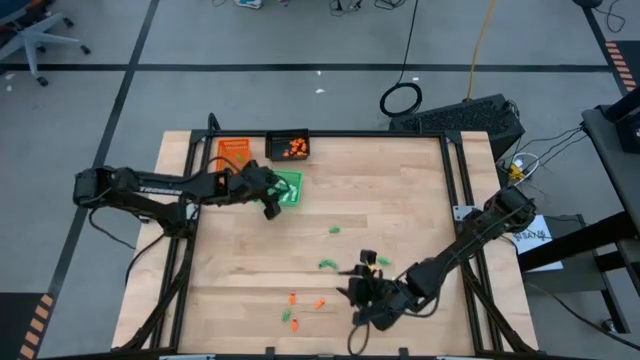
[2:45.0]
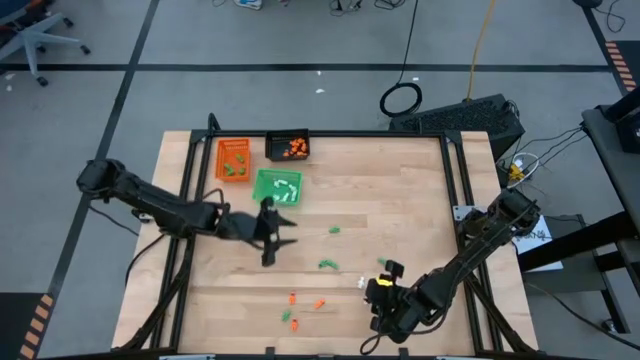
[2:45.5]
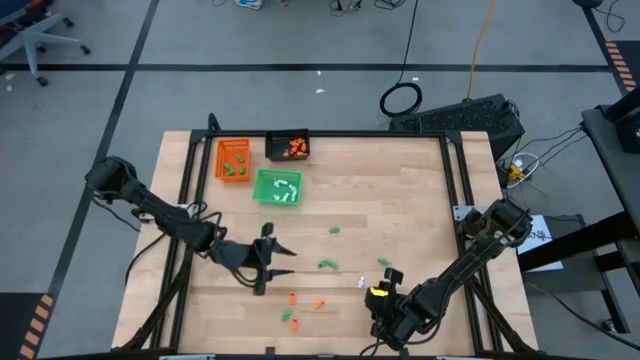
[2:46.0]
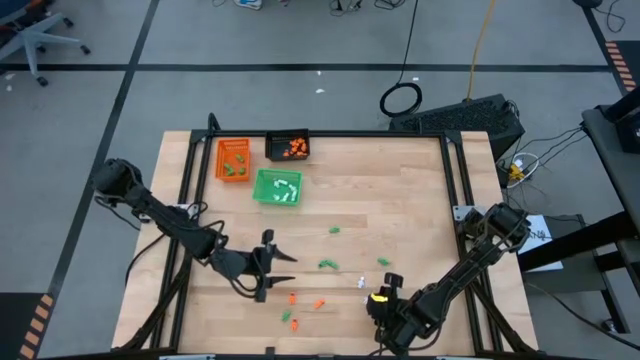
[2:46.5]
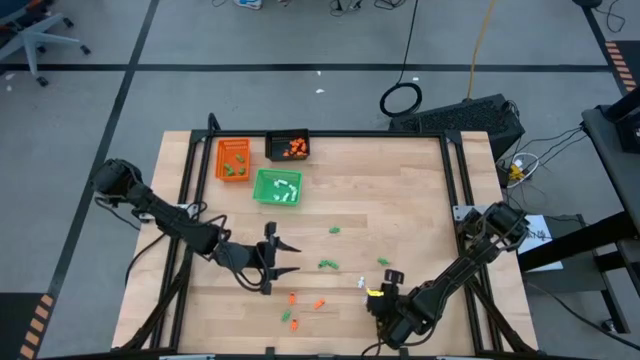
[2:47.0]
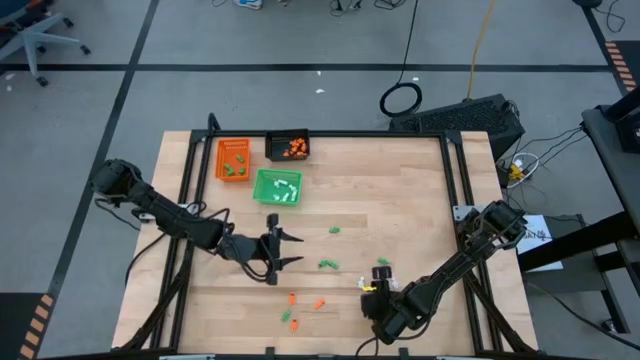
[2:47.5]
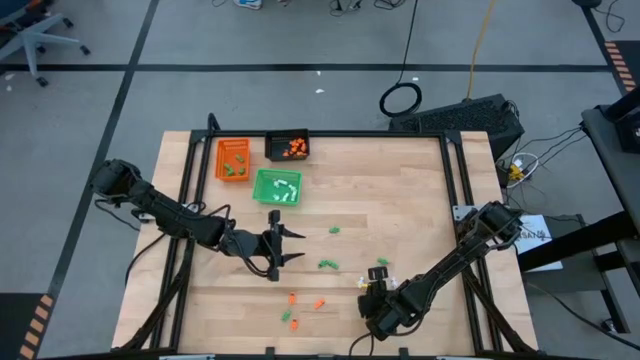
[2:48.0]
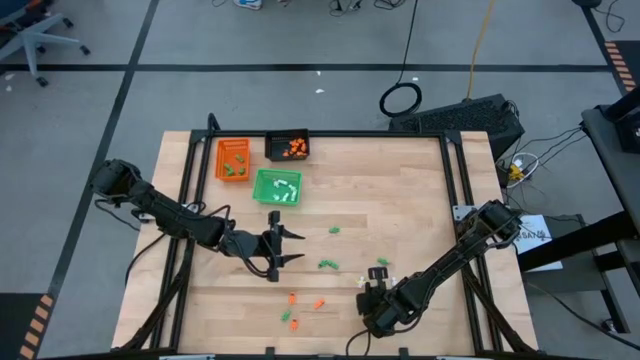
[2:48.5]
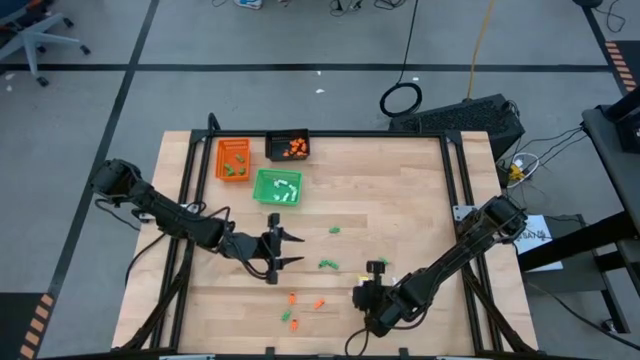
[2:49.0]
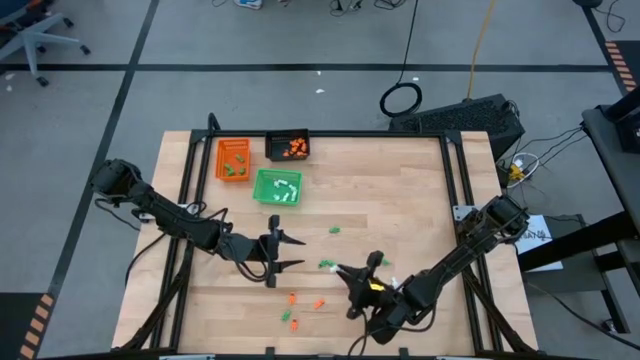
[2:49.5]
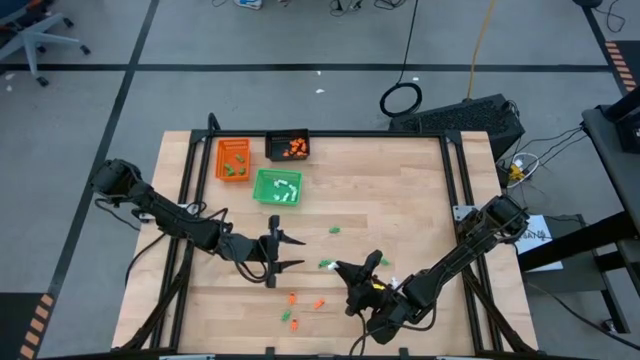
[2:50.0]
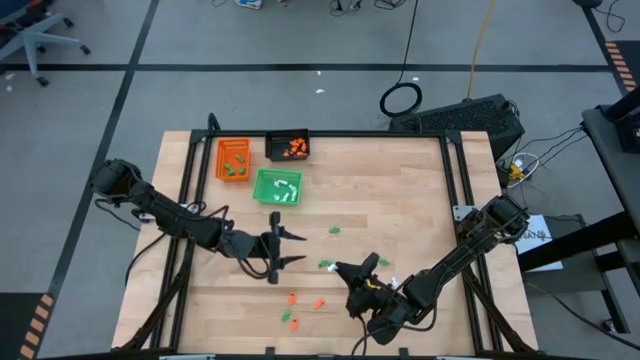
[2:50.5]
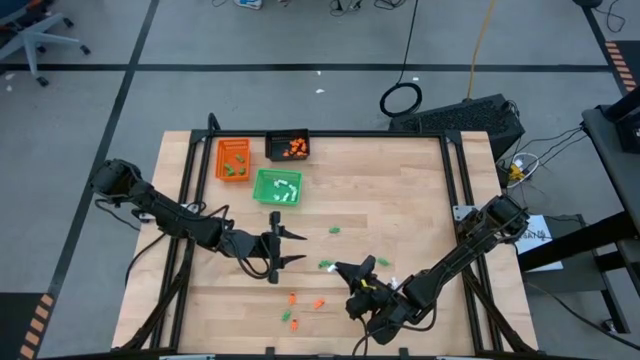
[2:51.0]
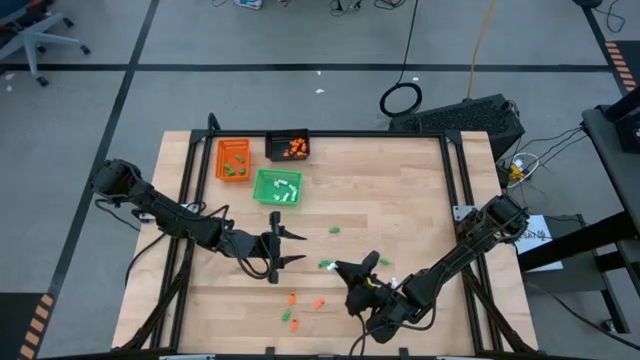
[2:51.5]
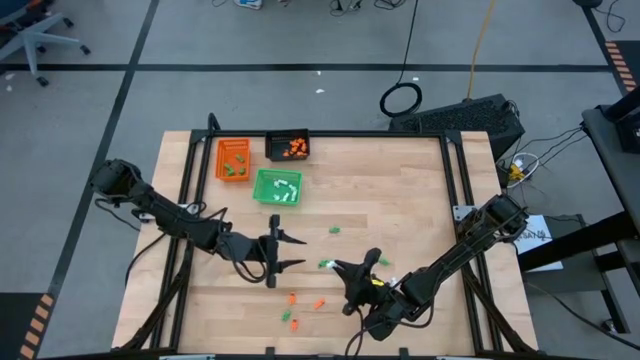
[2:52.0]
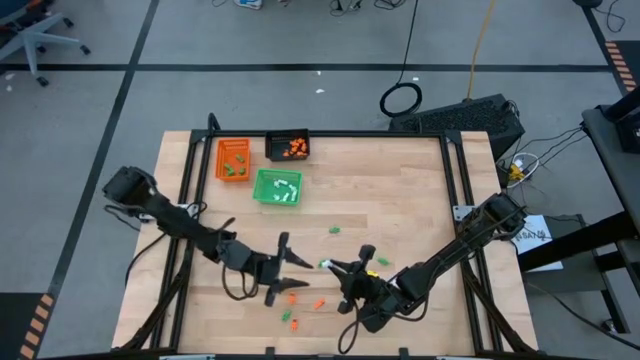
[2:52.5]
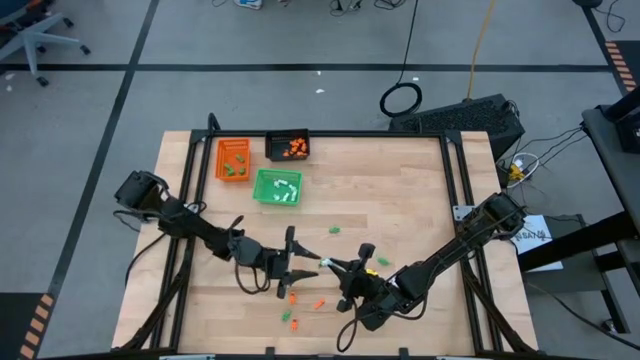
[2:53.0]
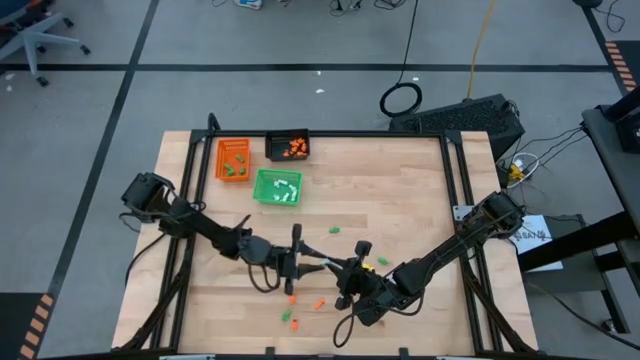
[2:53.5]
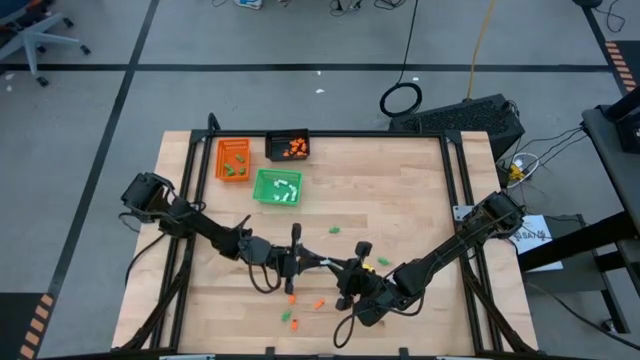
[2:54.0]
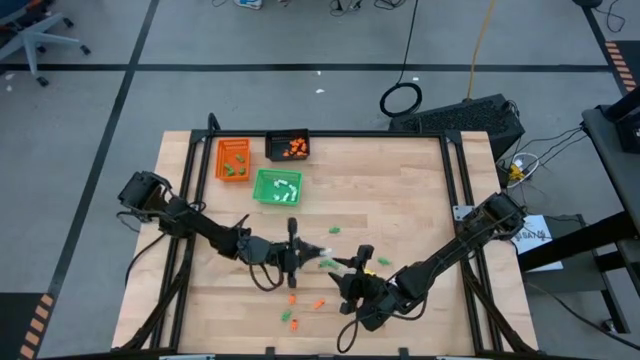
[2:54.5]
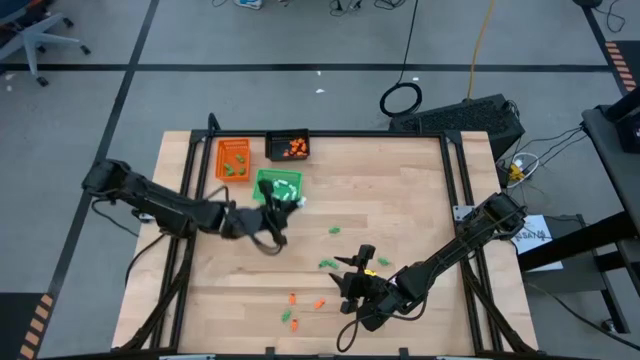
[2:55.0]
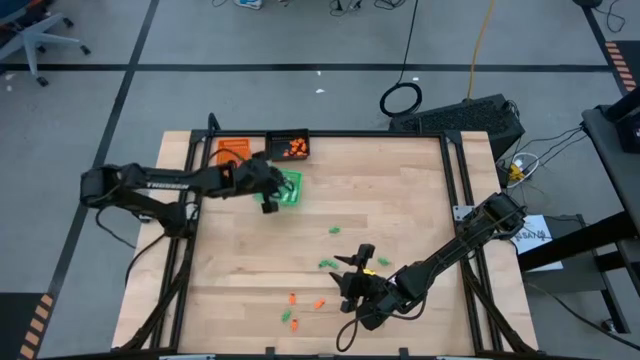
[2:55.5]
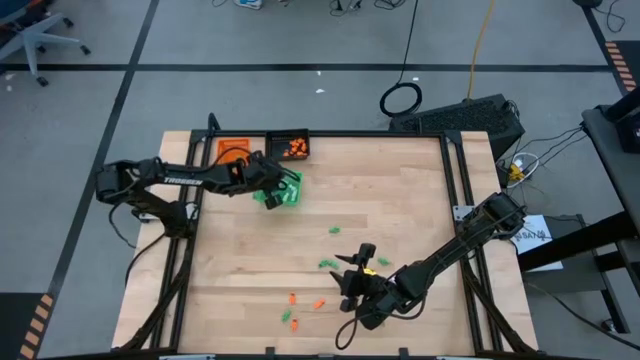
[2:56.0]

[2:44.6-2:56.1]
Task: Sort Halloween decoration
Put the white skeleton toy into the green bin

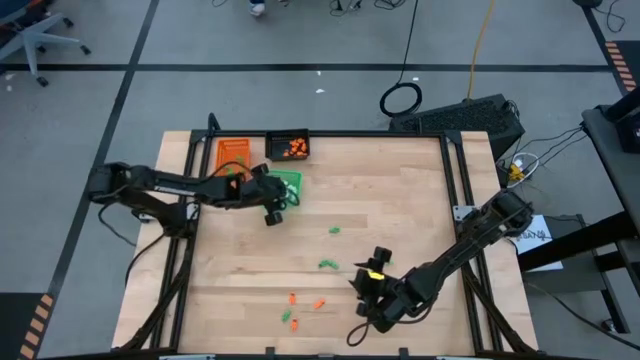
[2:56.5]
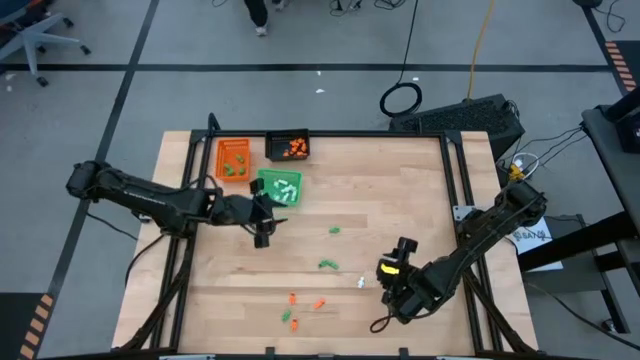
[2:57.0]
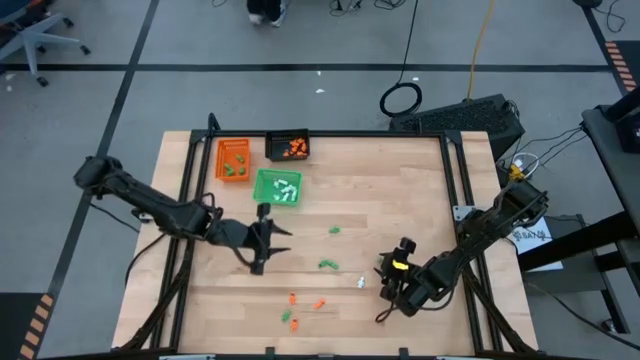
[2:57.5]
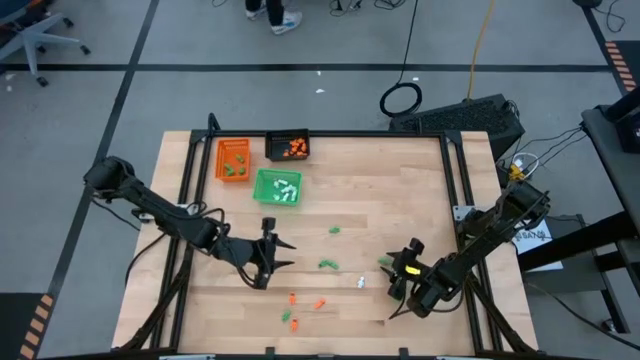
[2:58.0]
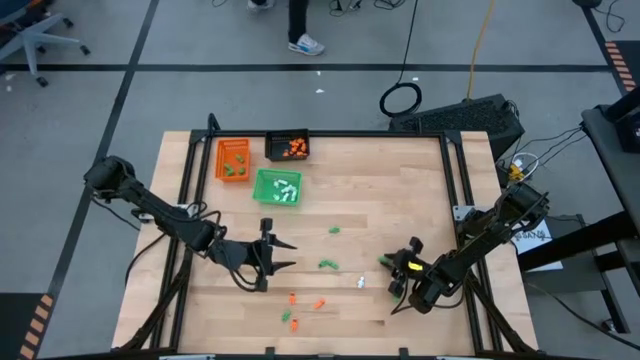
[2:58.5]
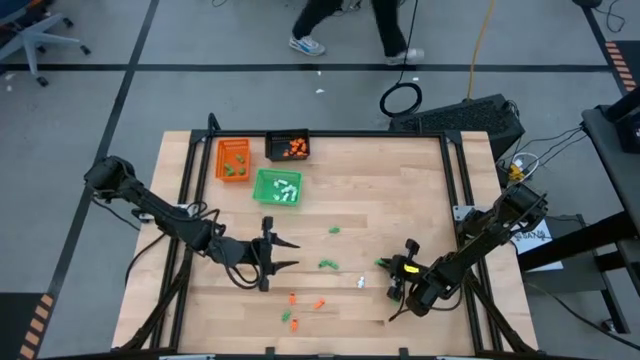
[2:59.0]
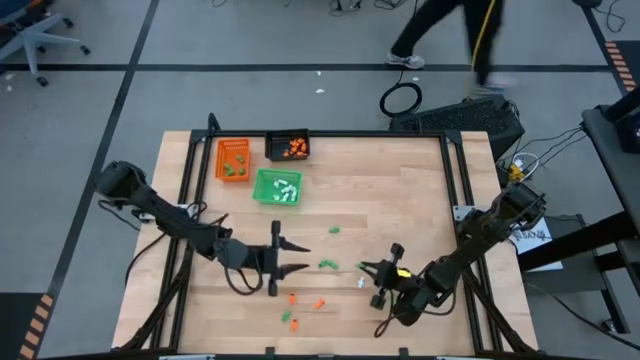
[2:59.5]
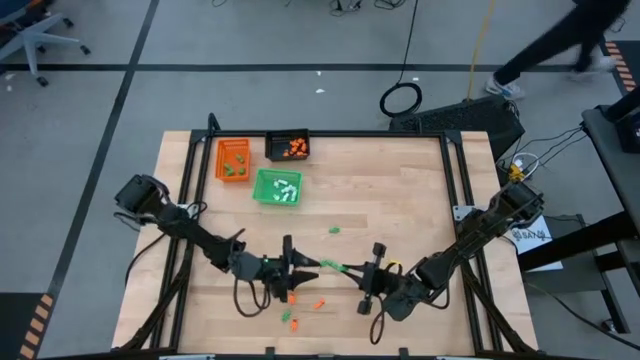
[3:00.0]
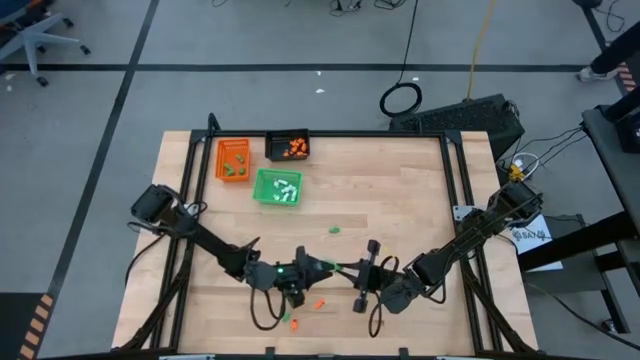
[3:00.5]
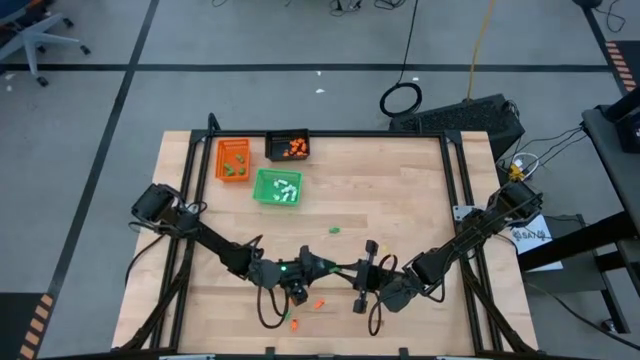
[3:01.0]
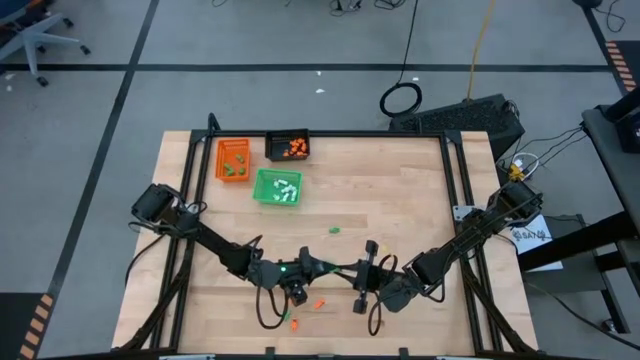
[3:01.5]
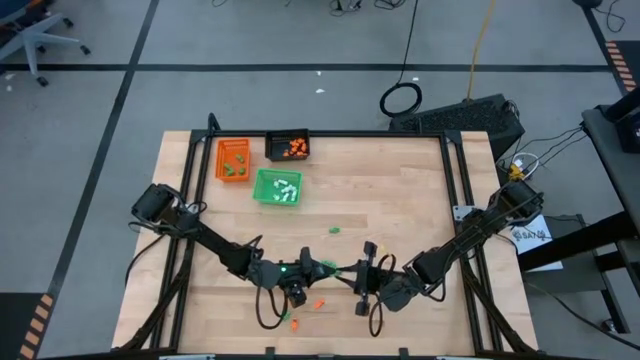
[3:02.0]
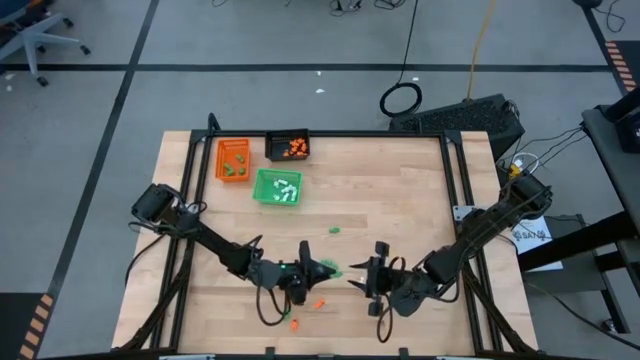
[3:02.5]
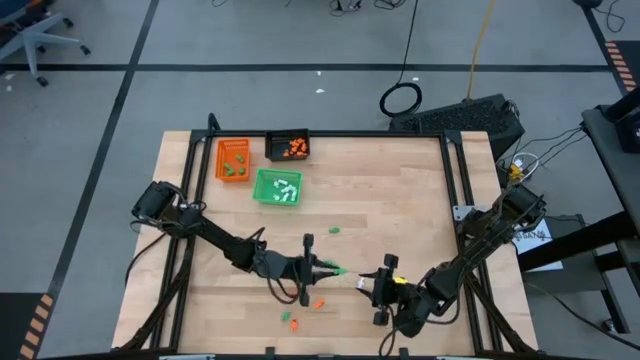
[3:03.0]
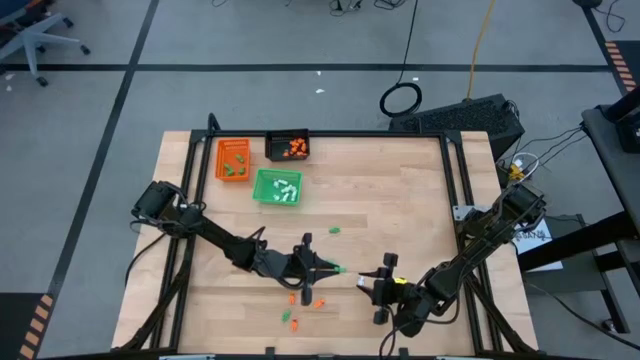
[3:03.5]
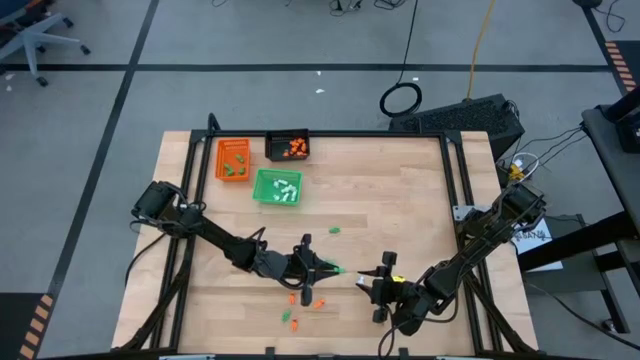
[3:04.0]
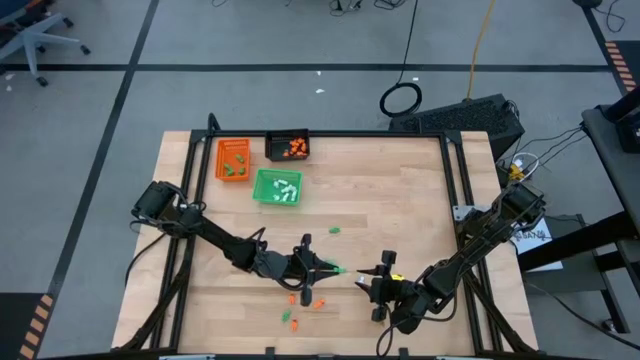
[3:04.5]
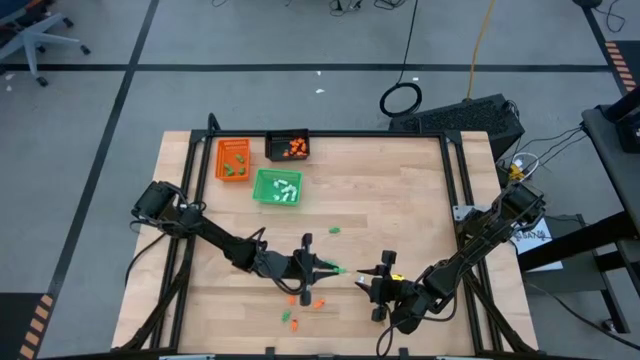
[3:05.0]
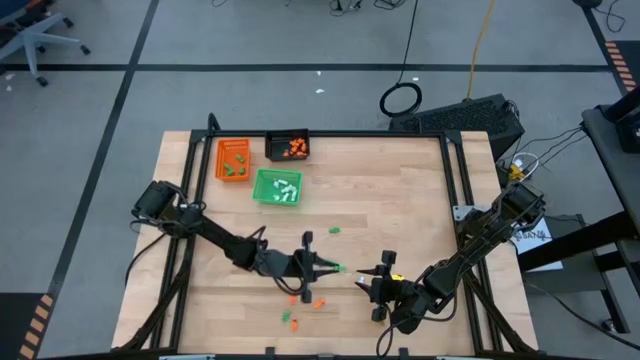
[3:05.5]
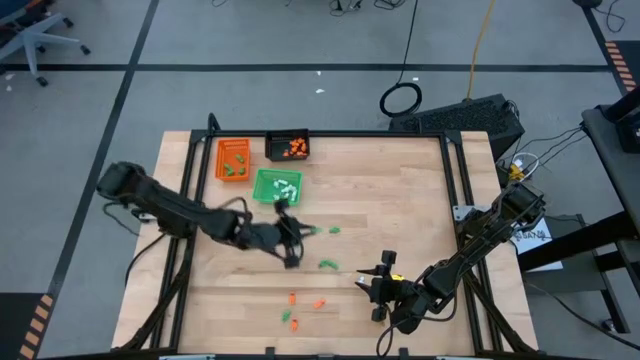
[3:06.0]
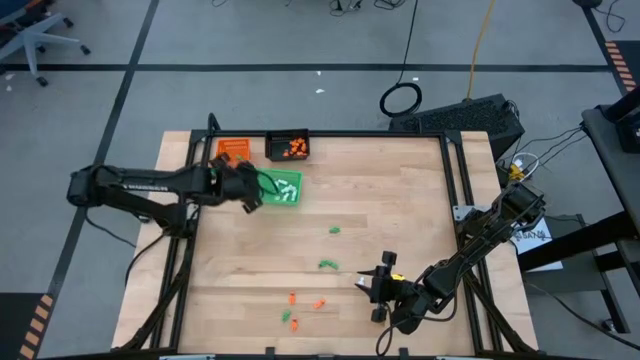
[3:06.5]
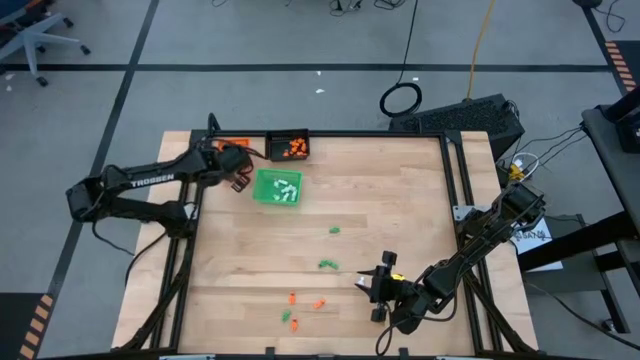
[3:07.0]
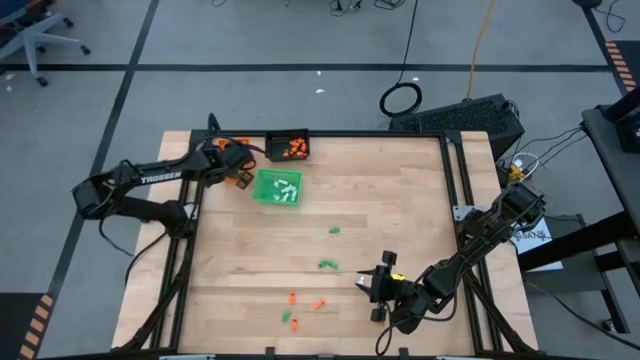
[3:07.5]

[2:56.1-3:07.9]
Put the green skeleton toy into the orange bin
